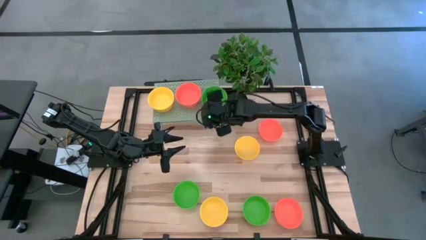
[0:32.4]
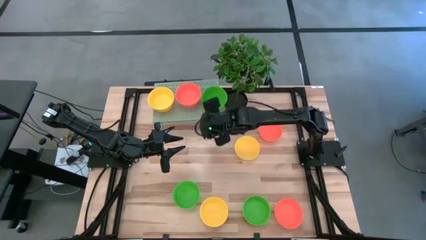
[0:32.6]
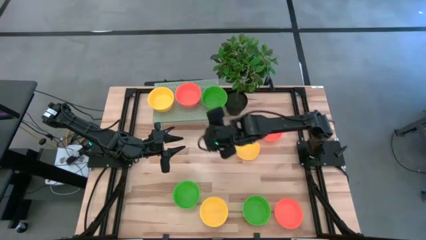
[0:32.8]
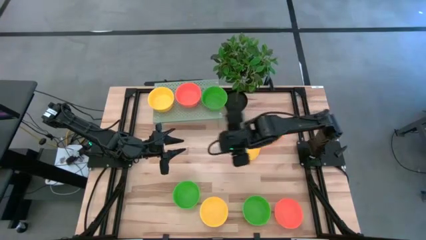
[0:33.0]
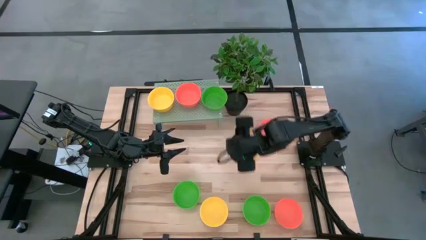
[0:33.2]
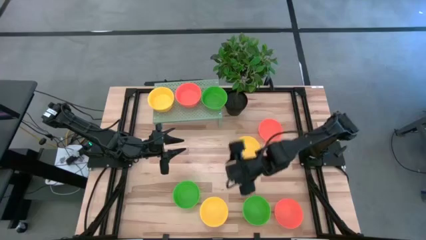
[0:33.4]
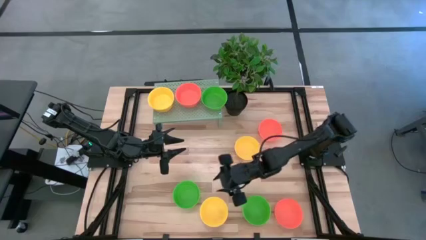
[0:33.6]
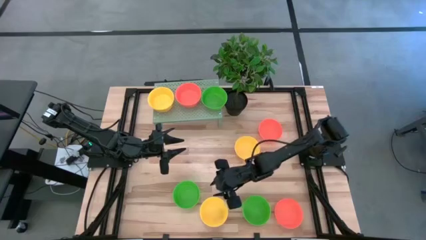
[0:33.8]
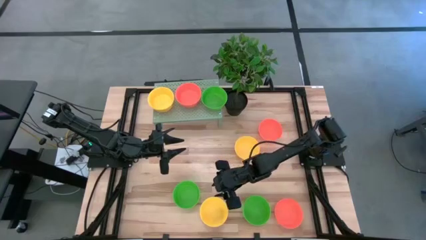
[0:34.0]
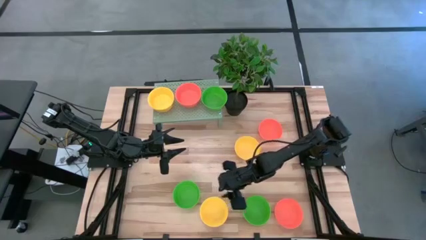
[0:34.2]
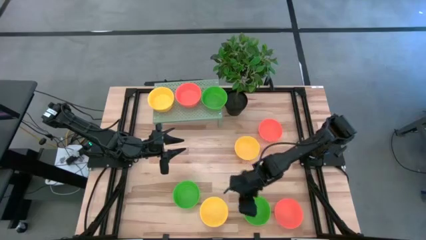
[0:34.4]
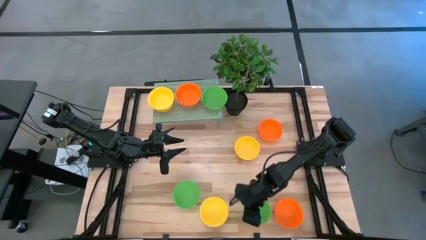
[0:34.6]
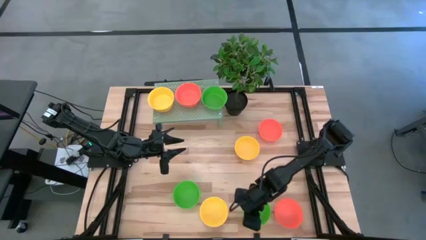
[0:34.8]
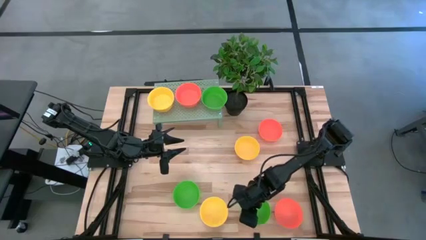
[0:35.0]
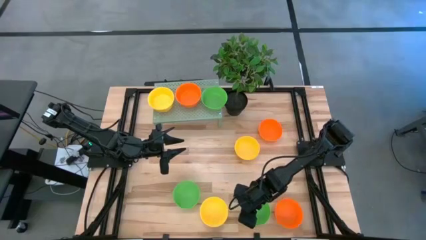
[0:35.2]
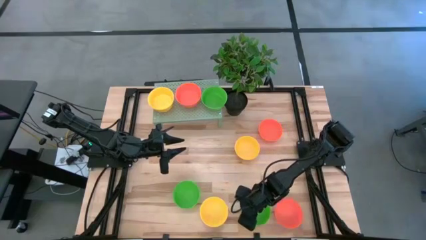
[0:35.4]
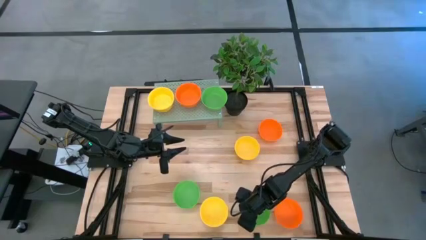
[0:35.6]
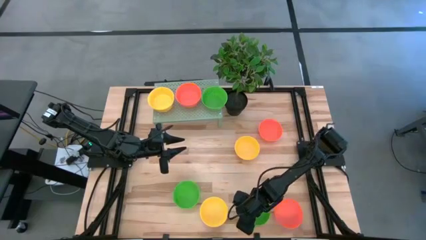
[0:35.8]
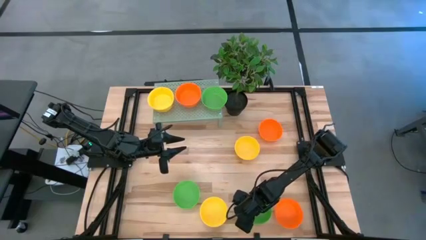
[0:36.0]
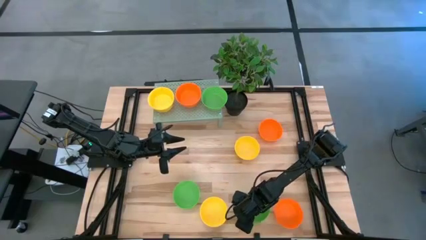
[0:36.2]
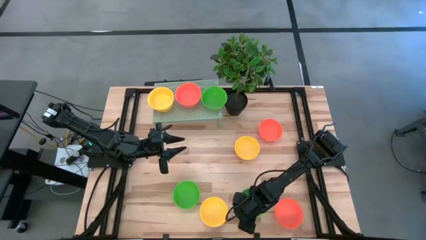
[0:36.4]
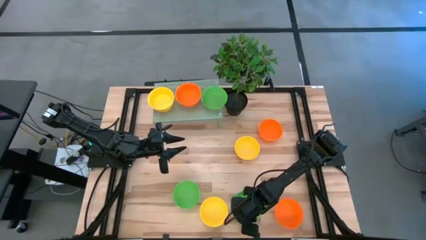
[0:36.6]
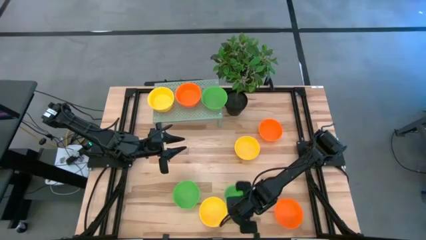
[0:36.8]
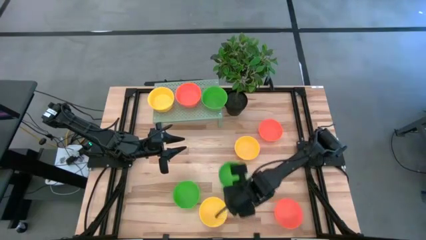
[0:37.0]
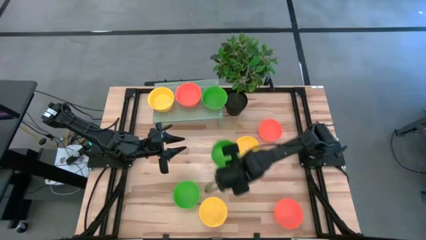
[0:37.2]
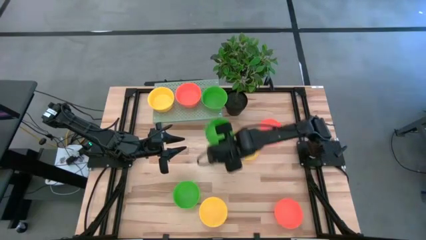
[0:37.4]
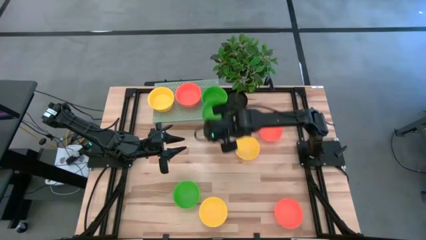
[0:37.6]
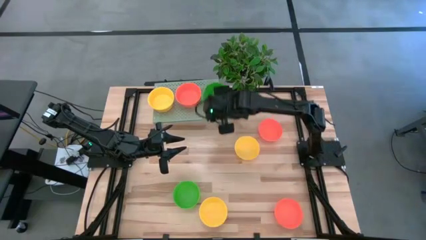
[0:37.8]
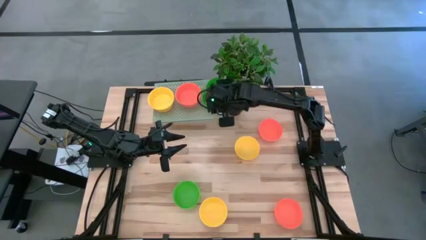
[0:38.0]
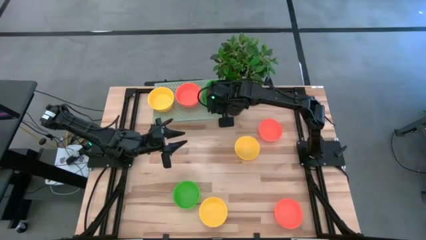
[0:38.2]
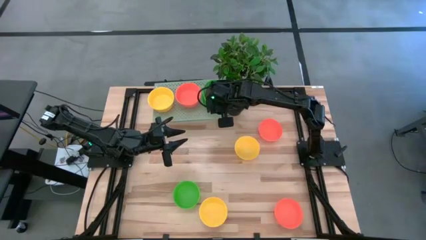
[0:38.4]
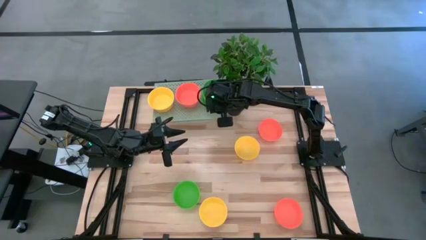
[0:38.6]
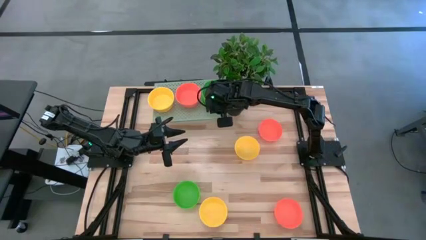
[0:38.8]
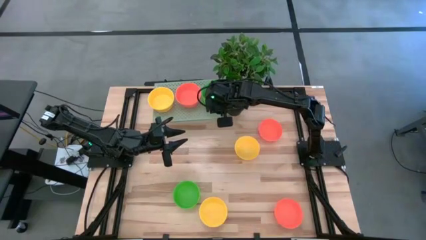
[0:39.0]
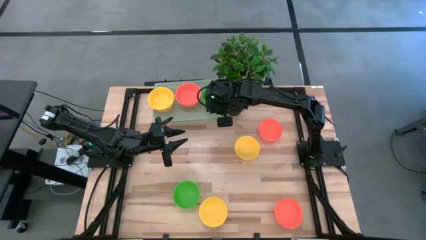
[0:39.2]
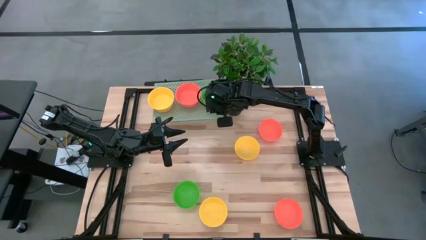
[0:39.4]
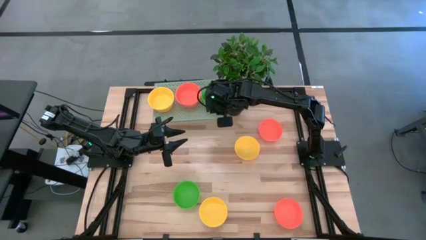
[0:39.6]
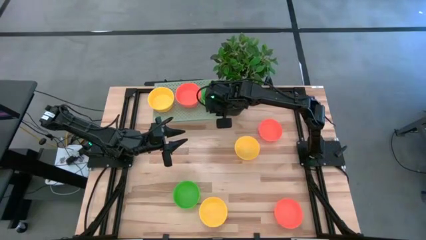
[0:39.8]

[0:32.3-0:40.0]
Task: Pick & Place Mini bowls
Stack the green bowl on top of the other green bowl on the shelf

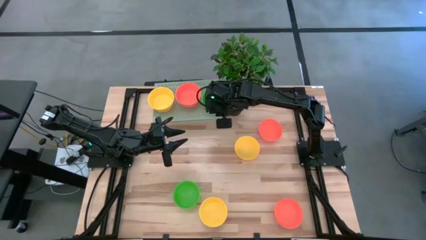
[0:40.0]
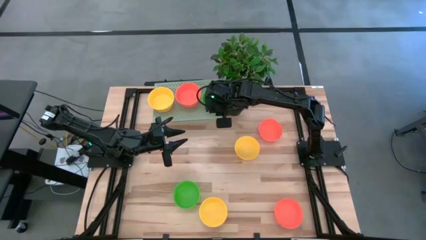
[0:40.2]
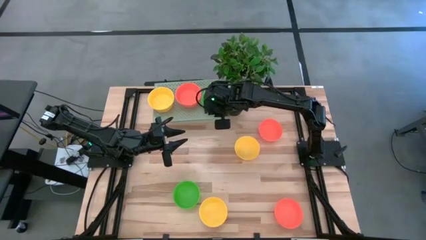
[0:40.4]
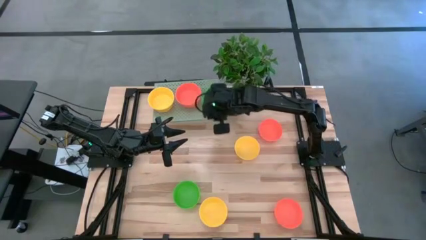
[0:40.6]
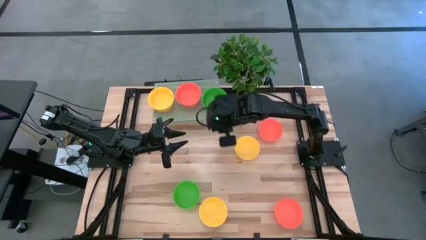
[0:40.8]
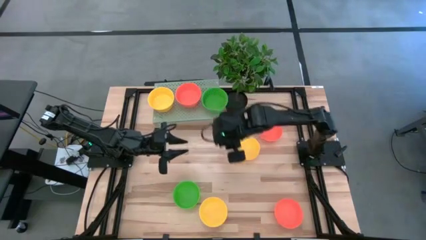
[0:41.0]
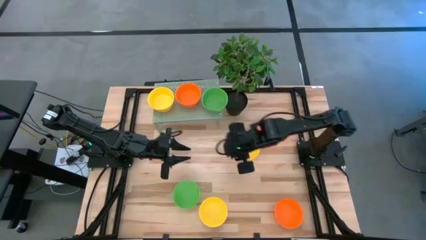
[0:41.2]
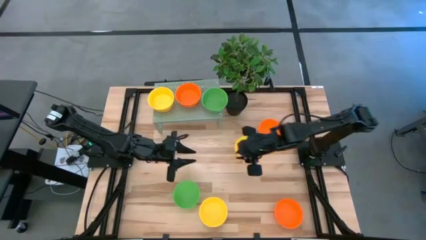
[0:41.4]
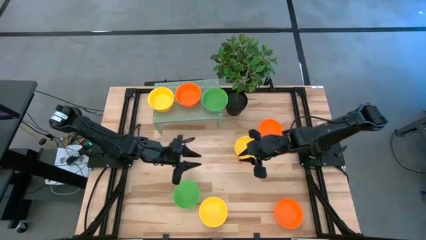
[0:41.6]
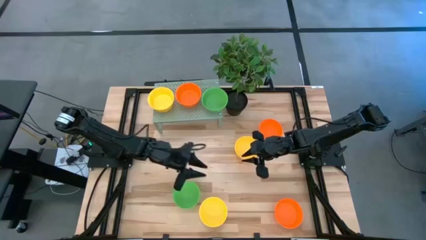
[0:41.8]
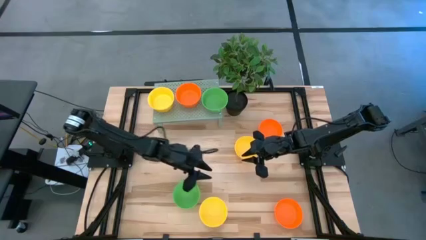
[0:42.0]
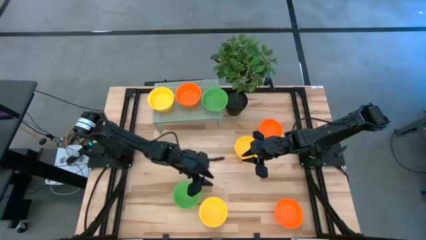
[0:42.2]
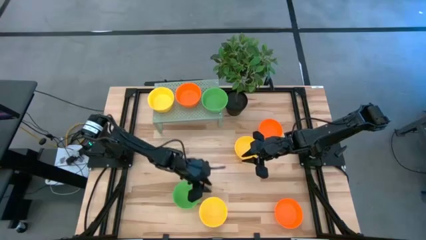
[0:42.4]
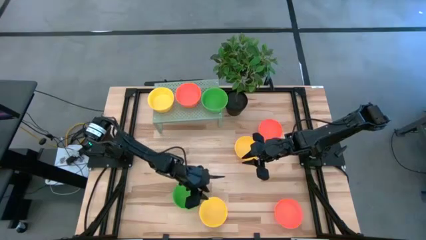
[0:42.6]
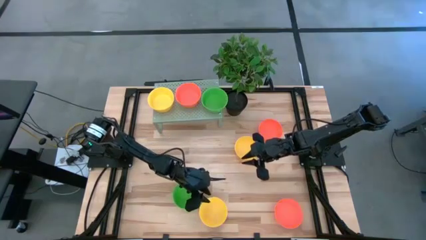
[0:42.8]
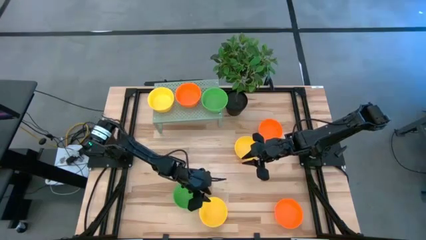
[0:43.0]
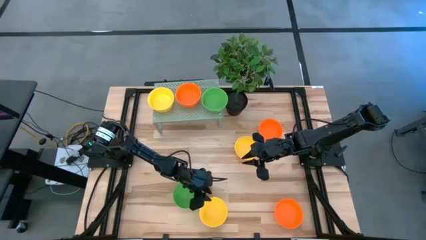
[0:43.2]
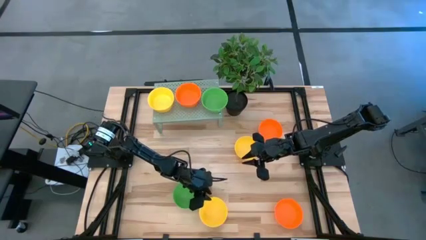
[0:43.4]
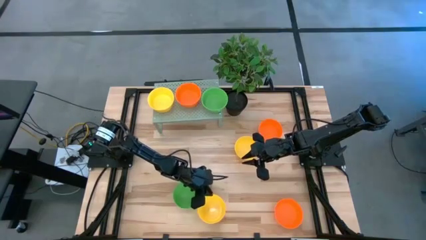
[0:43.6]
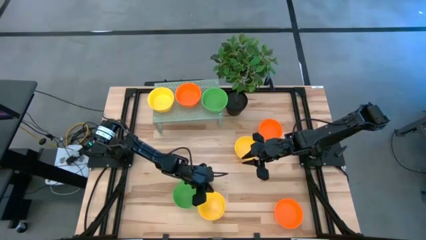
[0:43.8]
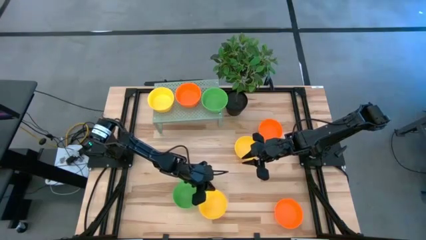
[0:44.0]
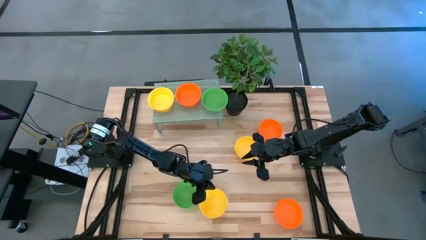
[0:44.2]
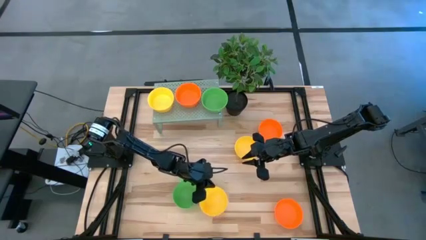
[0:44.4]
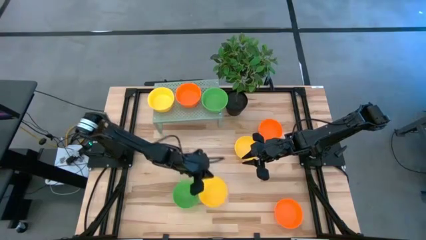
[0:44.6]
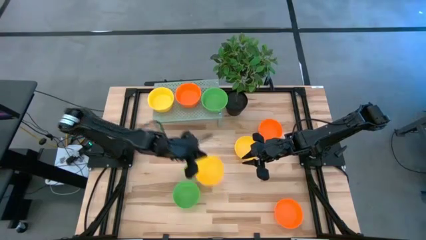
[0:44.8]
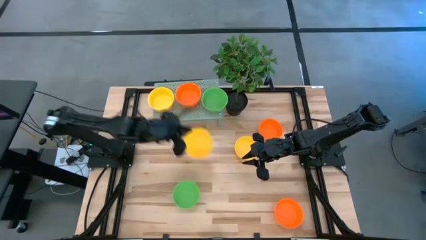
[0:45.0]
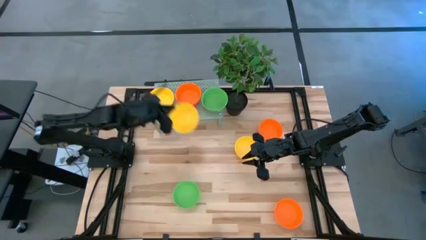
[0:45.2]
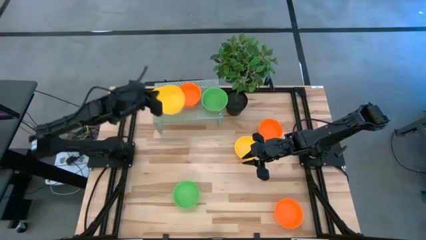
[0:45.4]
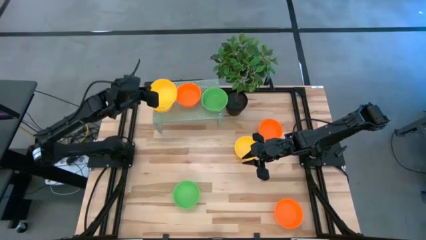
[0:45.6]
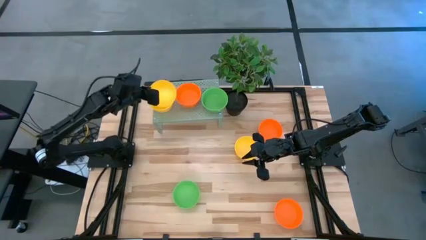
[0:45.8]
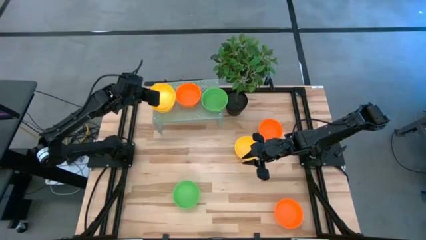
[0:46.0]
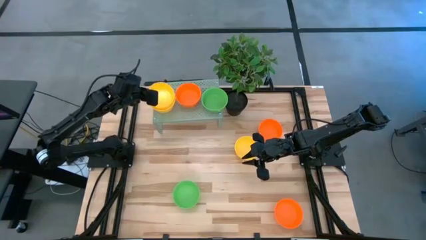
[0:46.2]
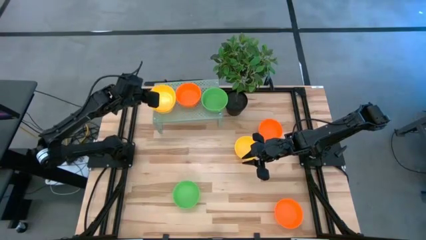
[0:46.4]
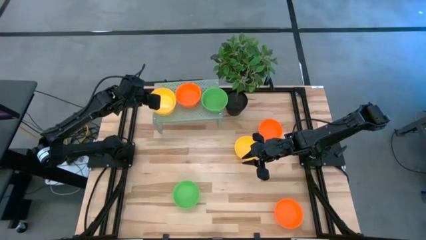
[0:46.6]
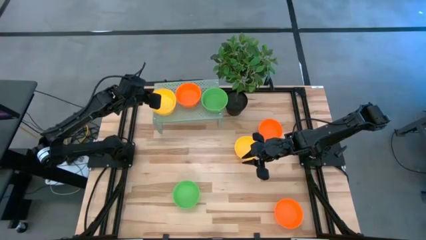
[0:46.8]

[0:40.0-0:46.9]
Stack the yellow bowl on top of the other yellow bowls on the shelf

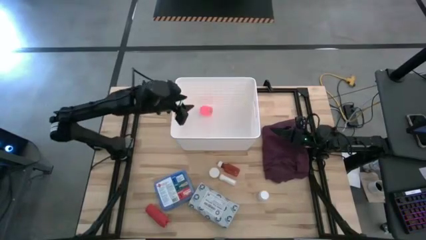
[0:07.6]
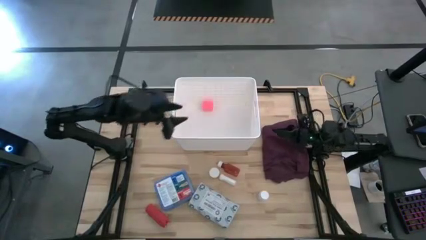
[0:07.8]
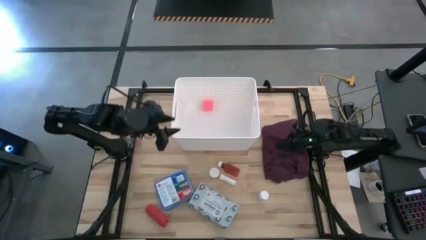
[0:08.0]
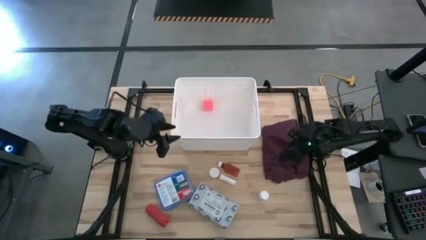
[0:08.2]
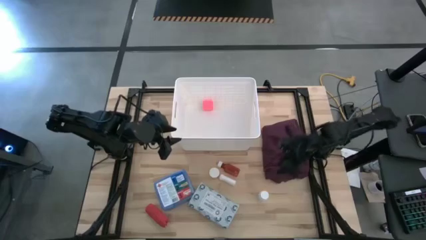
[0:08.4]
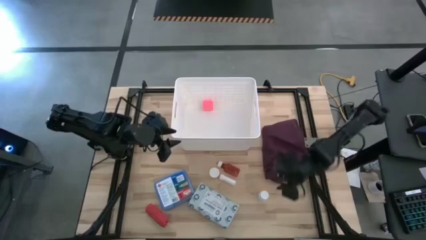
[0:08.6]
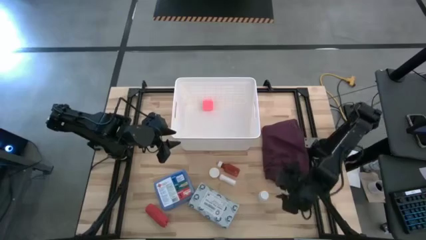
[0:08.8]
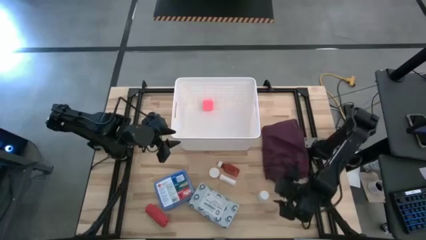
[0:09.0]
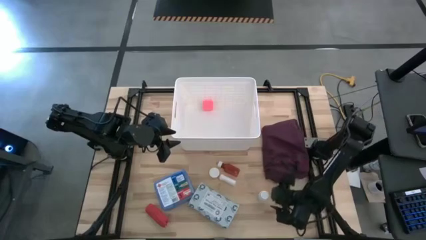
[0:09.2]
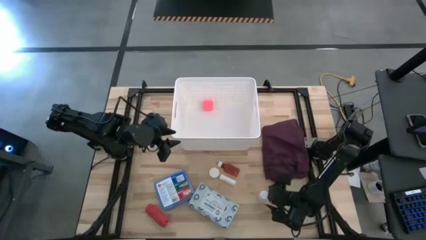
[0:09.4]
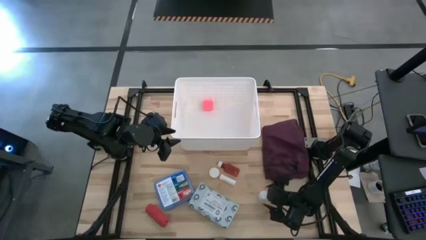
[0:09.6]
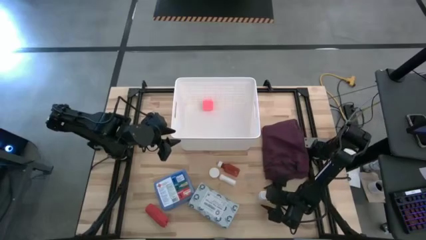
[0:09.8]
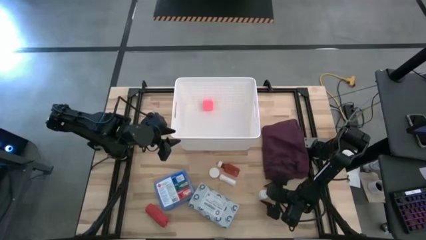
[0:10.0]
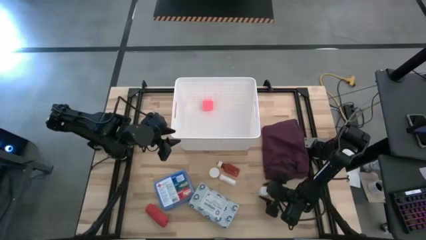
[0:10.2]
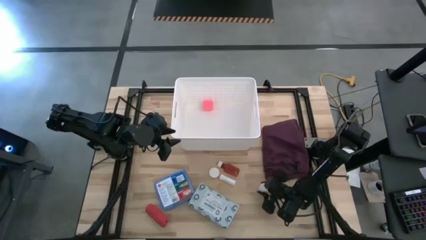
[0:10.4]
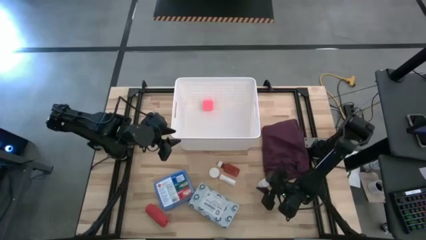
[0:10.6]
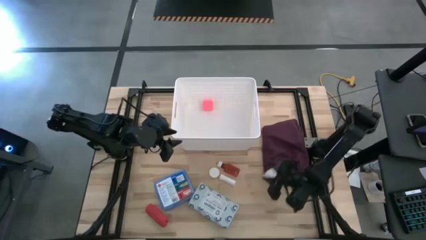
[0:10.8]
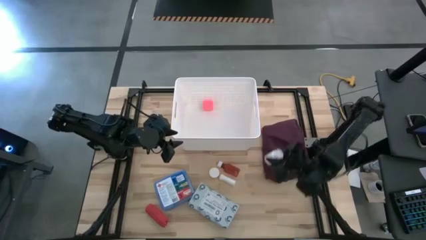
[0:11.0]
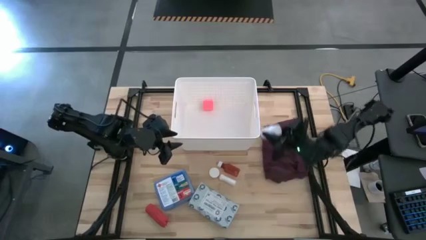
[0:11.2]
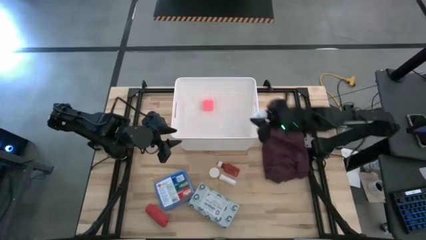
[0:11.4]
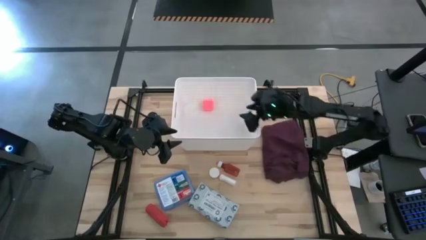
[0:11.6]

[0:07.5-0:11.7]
Task: Pick & place medical supplies in basket/bin
Put the white medicine bottle into the white basket
